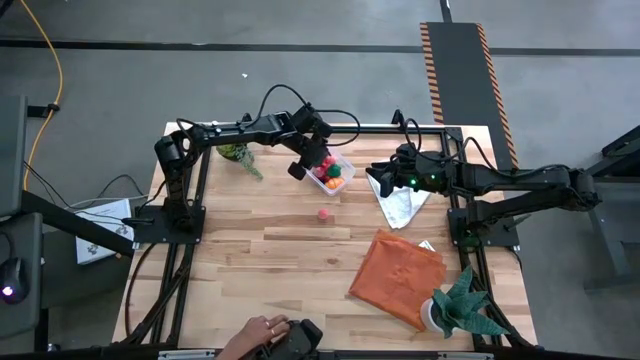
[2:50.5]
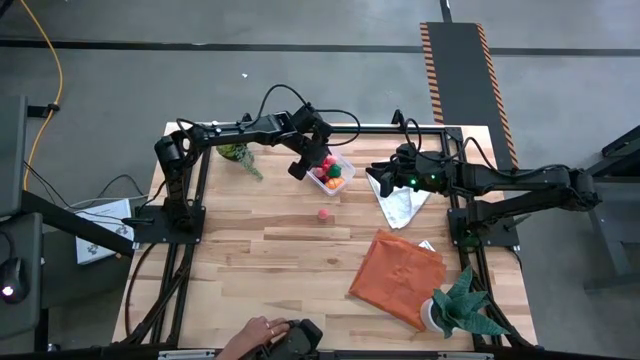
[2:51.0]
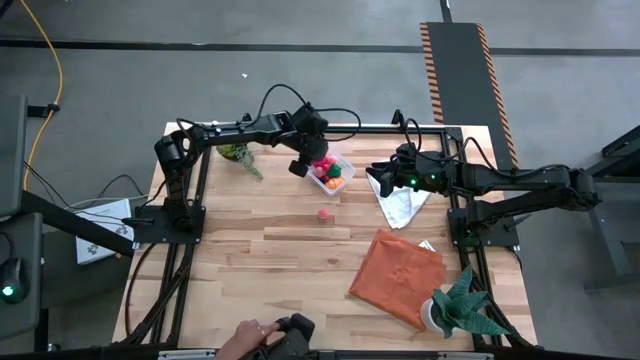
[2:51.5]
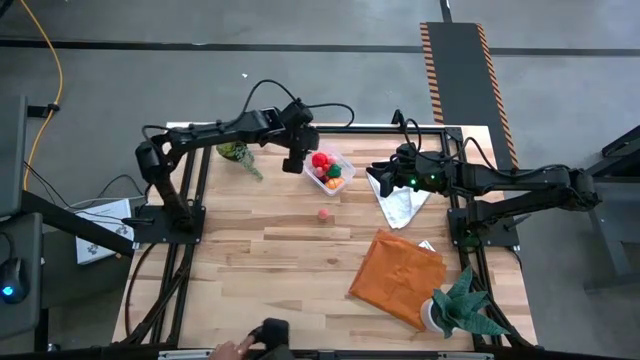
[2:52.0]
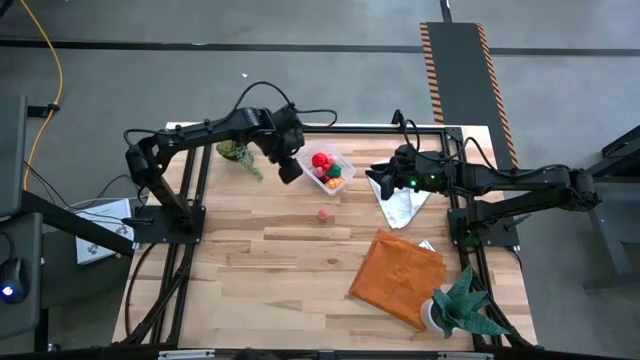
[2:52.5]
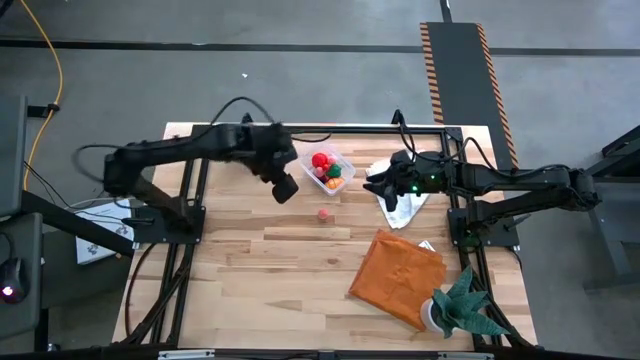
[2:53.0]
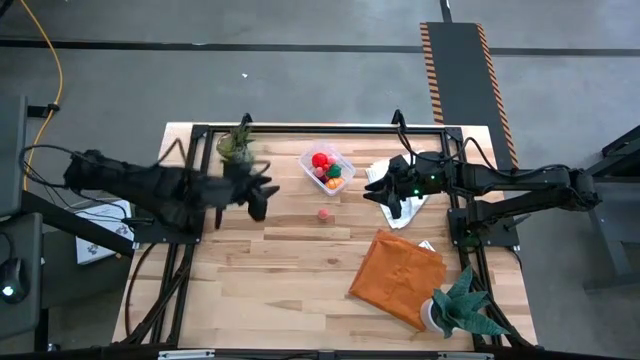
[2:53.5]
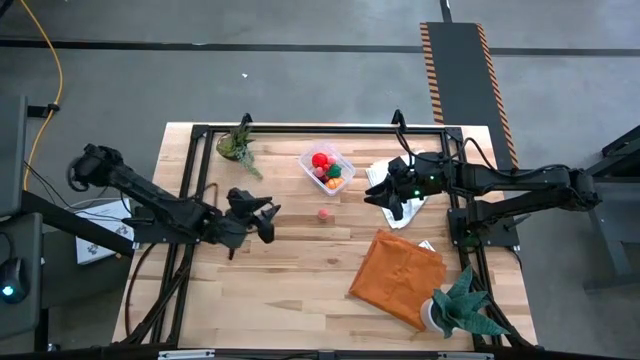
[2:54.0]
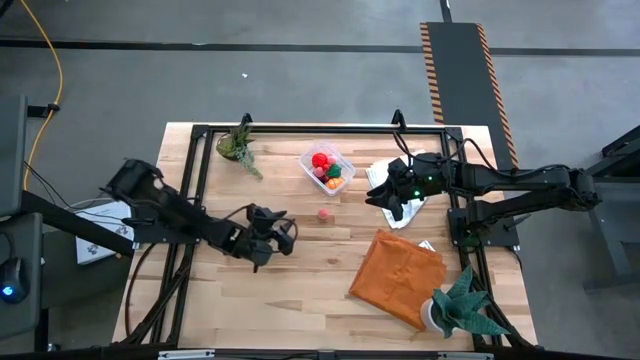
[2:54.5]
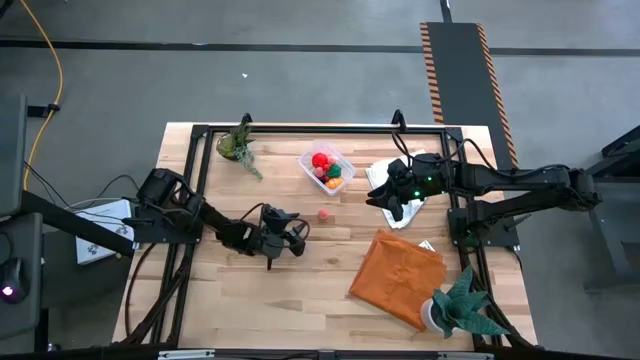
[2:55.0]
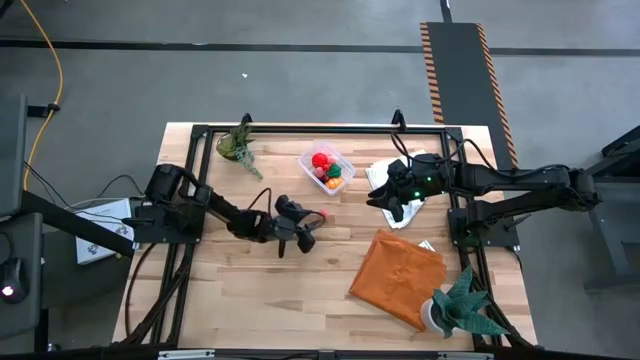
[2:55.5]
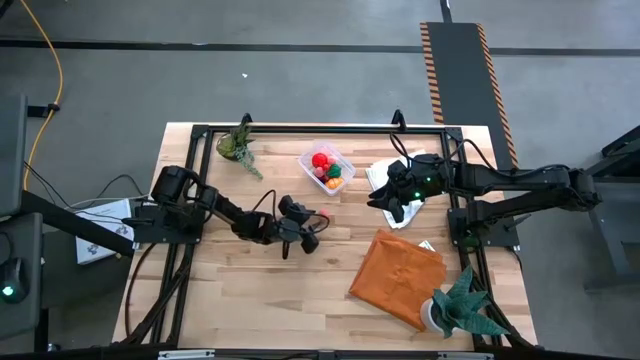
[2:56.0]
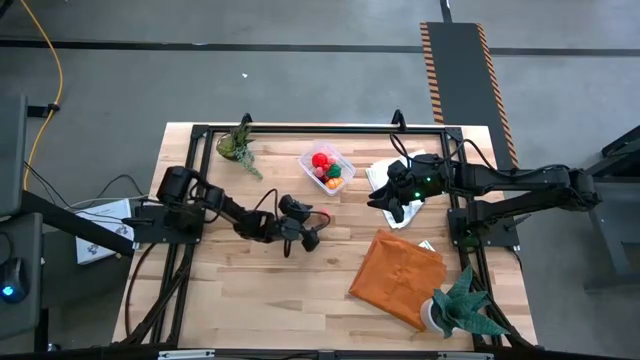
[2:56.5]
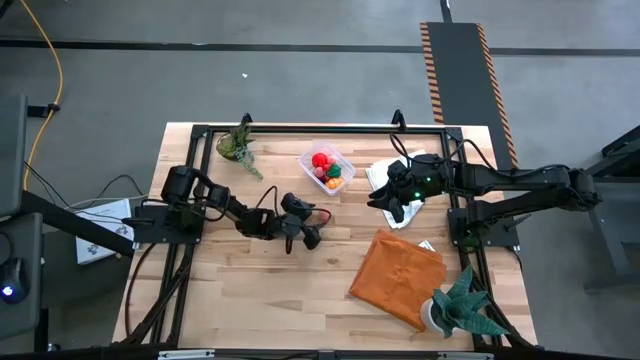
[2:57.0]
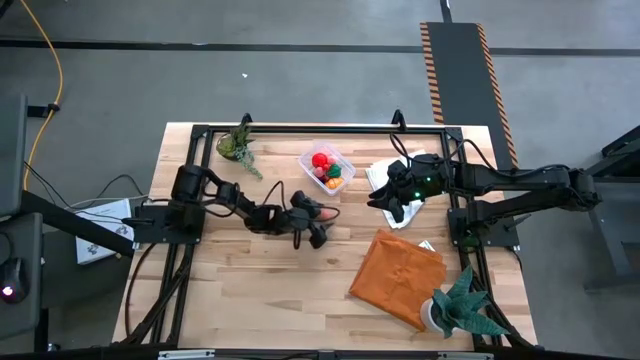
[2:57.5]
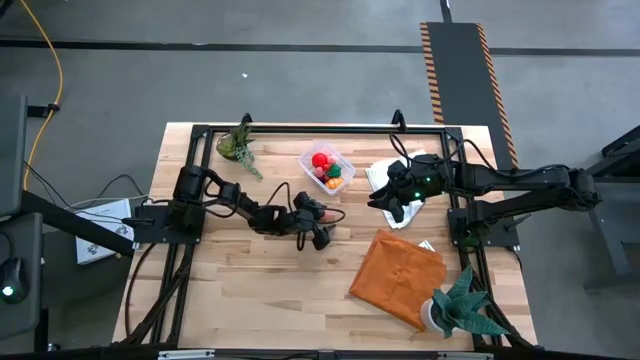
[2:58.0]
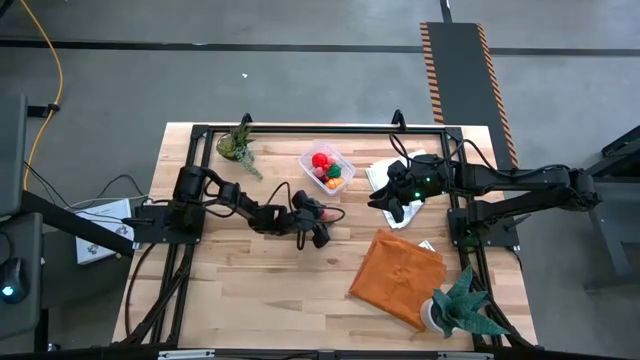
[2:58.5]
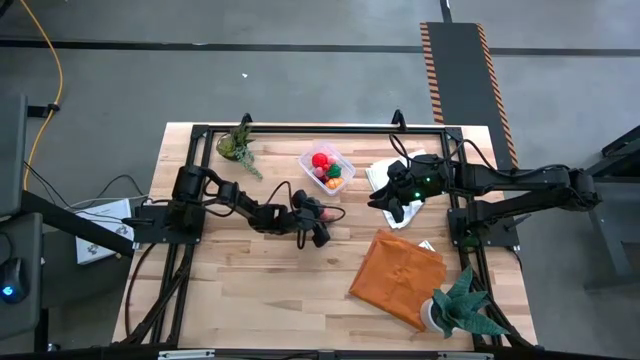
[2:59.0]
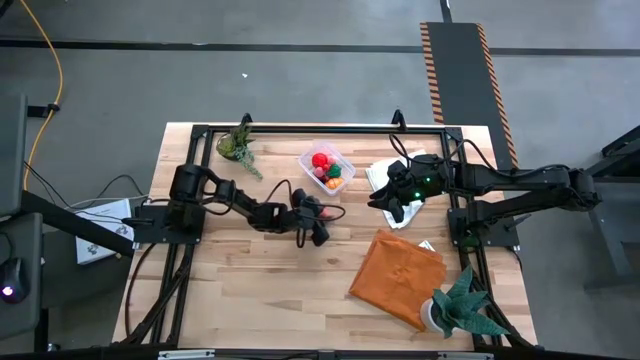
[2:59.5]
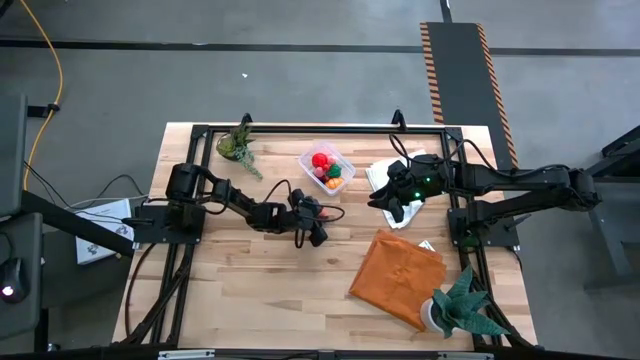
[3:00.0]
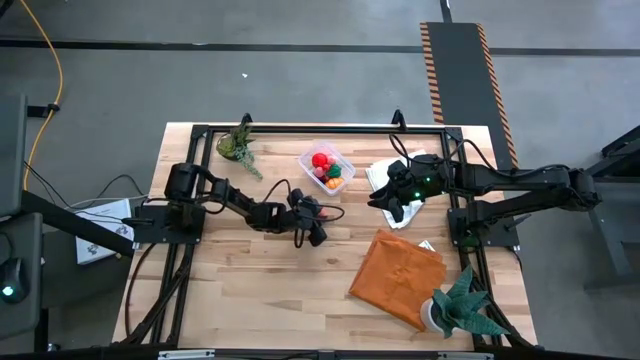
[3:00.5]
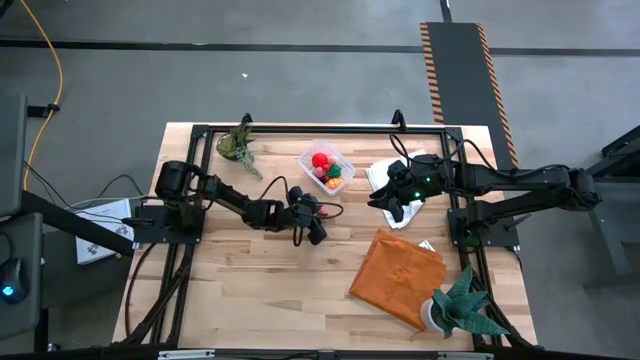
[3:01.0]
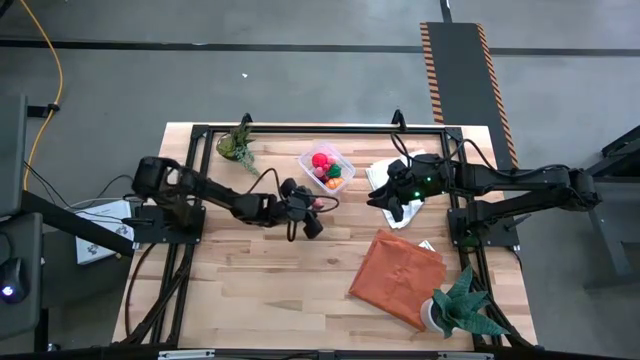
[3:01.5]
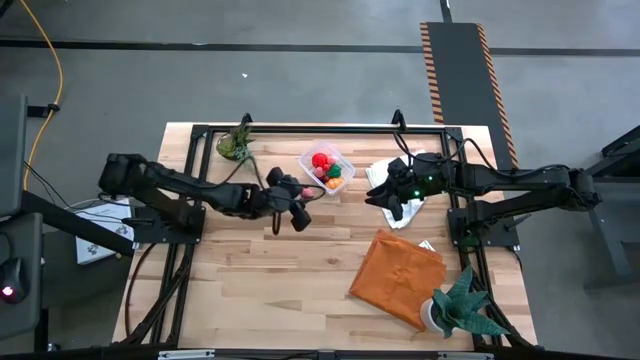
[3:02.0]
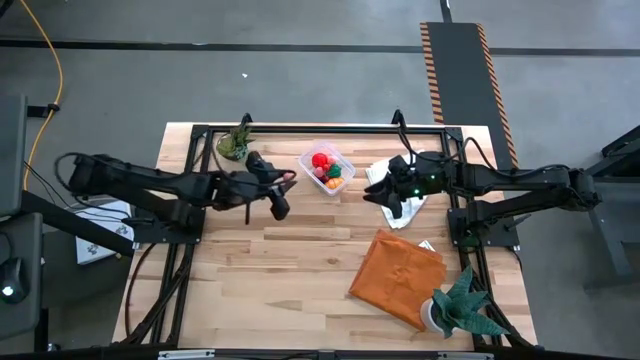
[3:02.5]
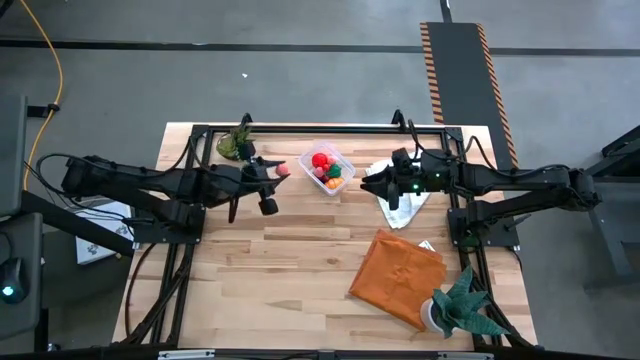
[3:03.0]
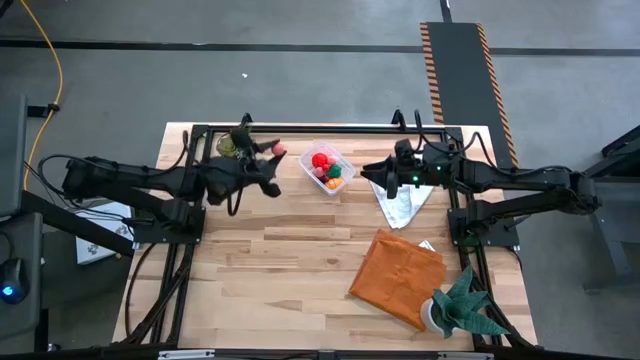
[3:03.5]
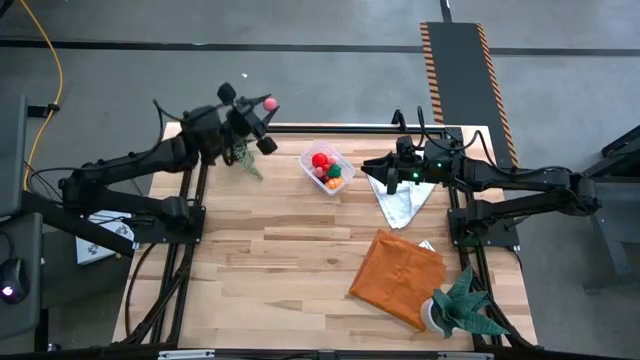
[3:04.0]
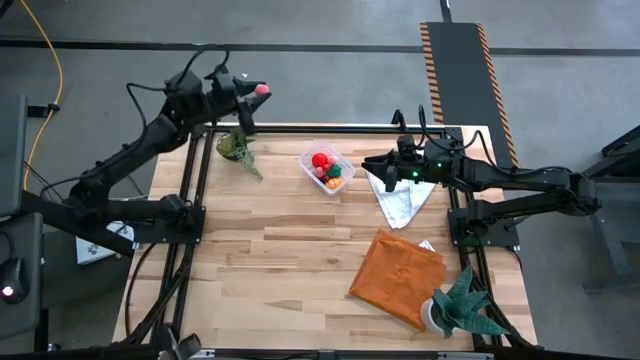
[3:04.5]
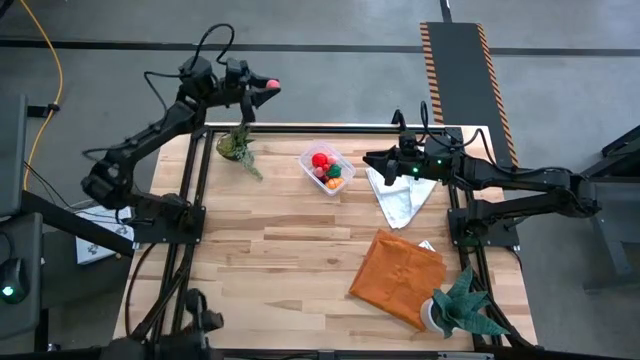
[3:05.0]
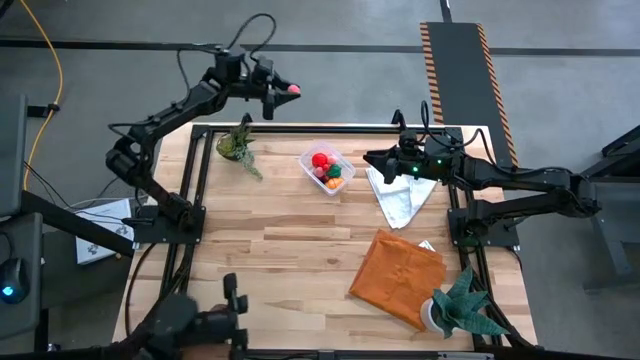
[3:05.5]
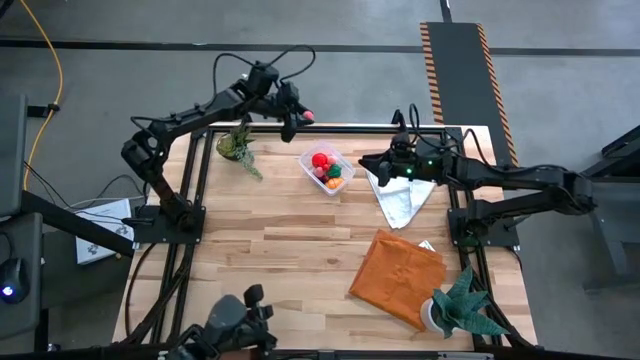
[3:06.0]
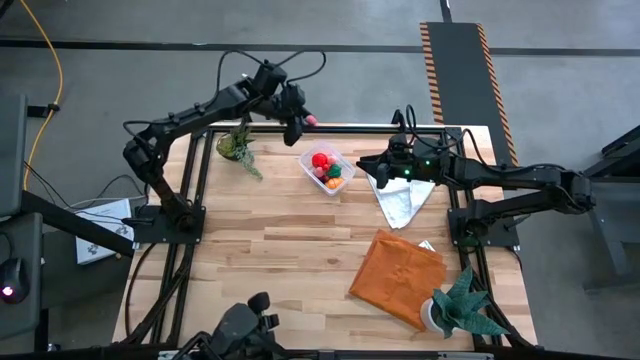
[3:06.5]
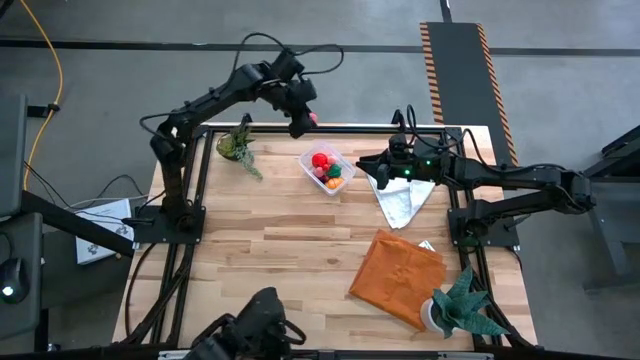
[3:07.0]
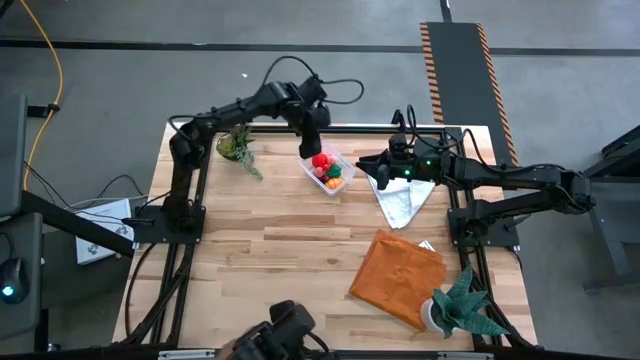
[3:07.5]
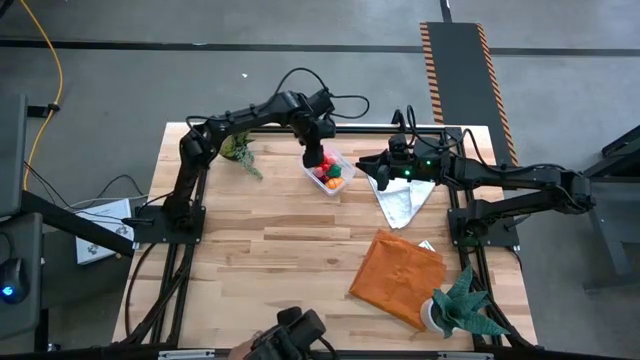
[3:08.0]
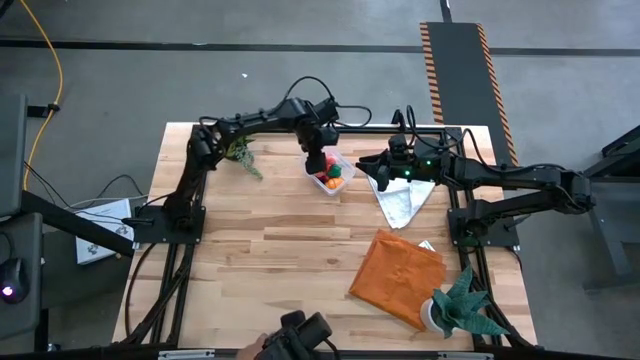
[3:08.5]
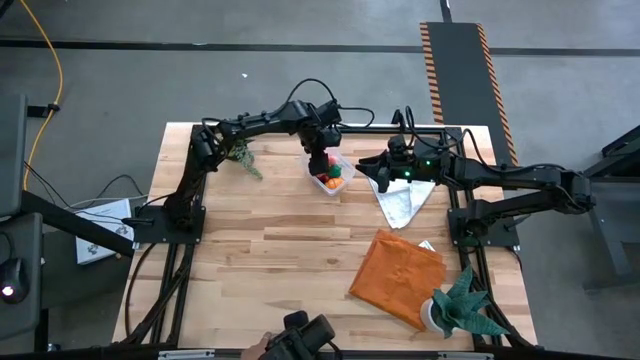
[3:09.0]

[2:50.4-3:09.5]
Task: Pick and placing Produce into tupperware
Put the pink peach into the transparent bin

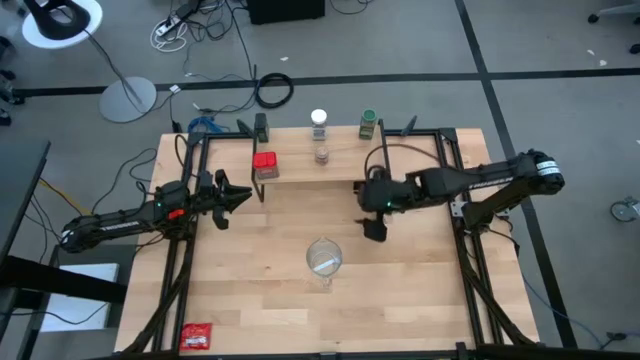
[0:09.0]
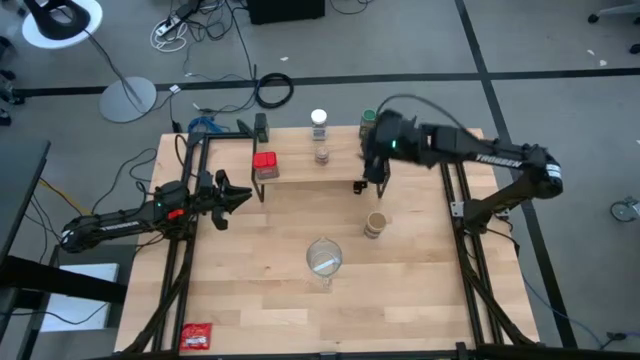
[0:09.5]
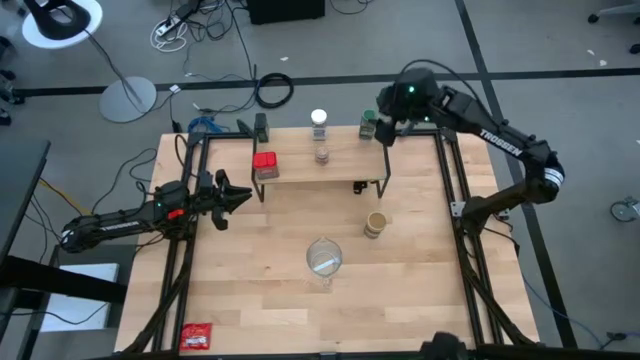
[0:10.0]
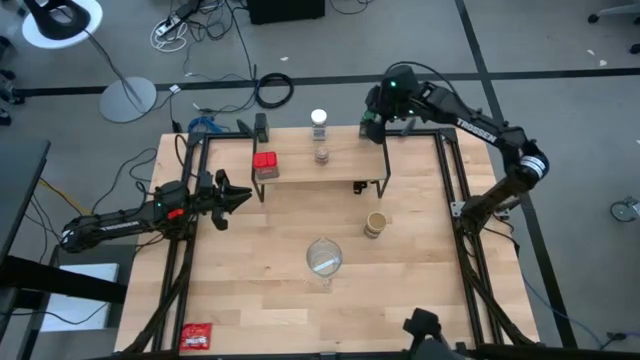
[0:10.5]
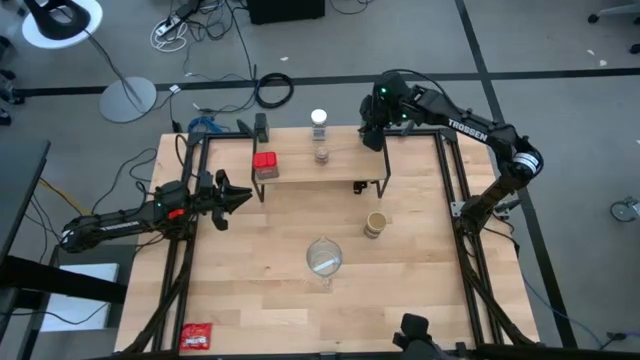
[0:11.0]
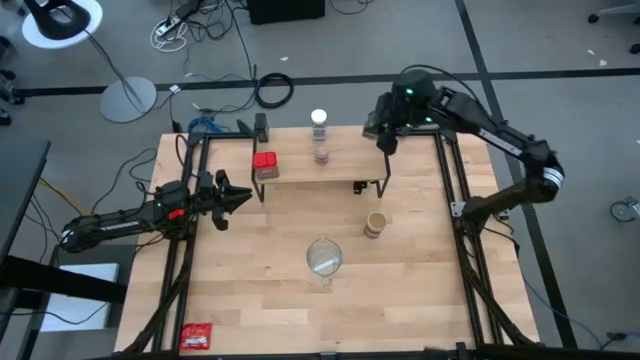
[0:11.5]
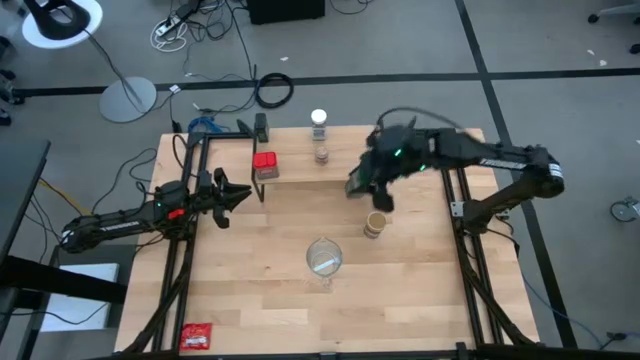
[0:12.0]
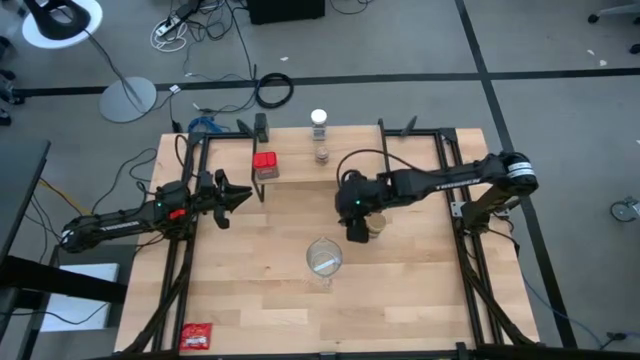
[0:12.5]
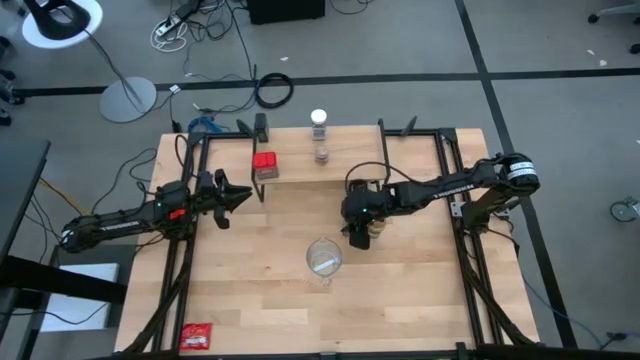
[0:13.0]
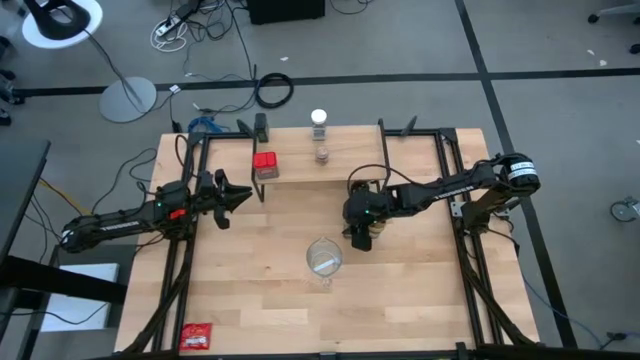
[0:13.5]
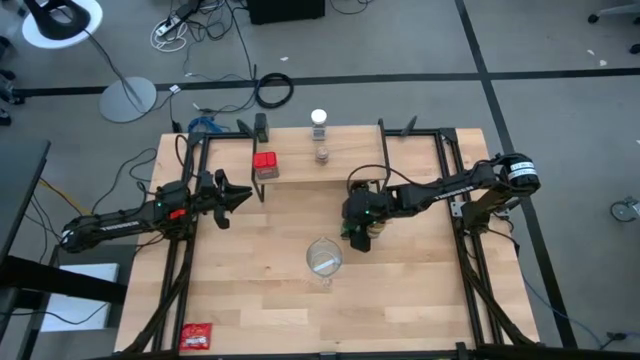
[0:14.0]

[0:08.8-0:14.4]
Task: Shelf spices
Remove the green seasoning bottle from the shelf
